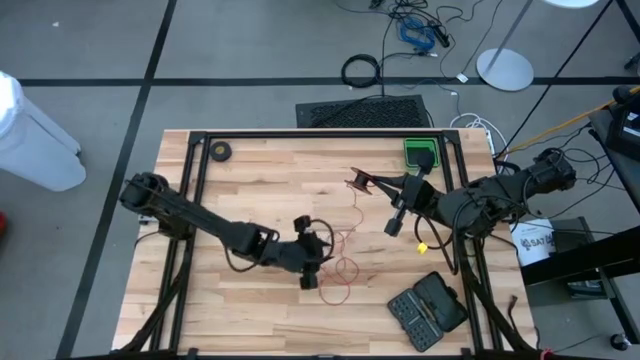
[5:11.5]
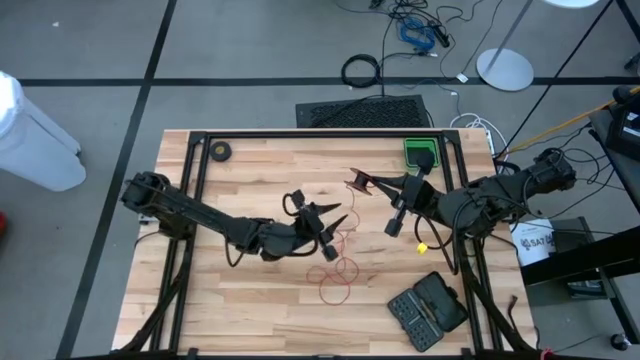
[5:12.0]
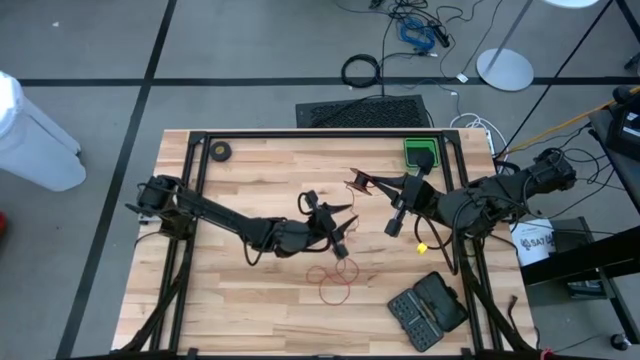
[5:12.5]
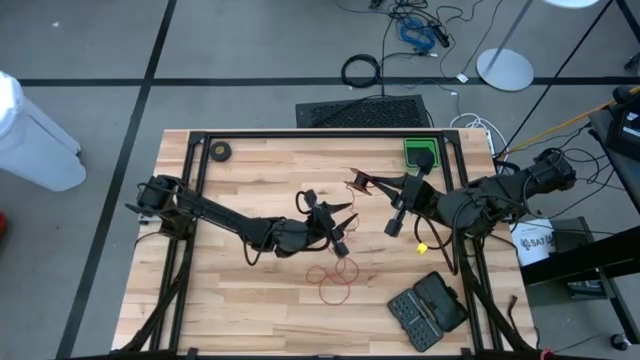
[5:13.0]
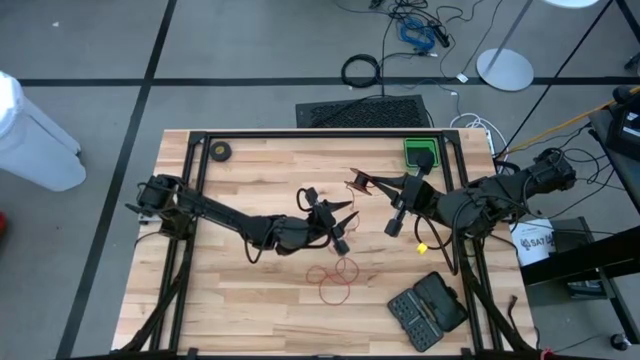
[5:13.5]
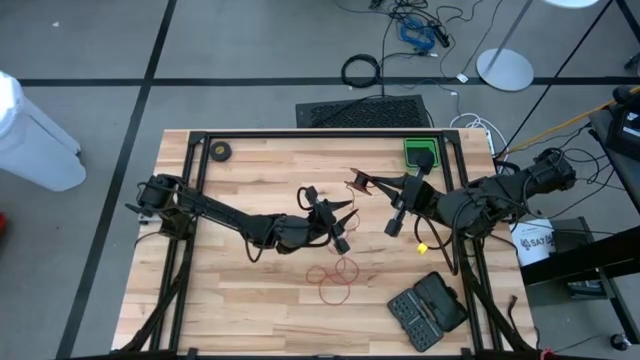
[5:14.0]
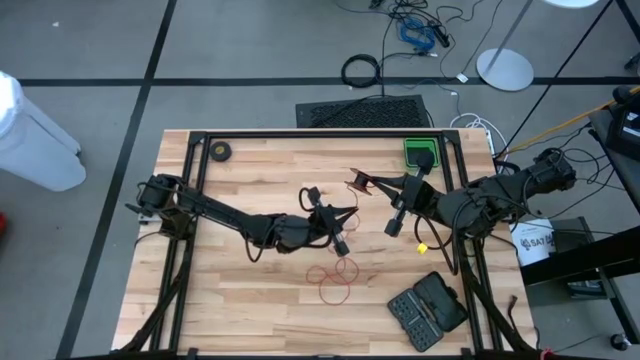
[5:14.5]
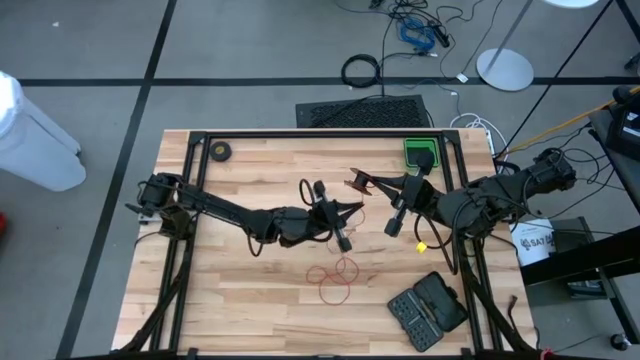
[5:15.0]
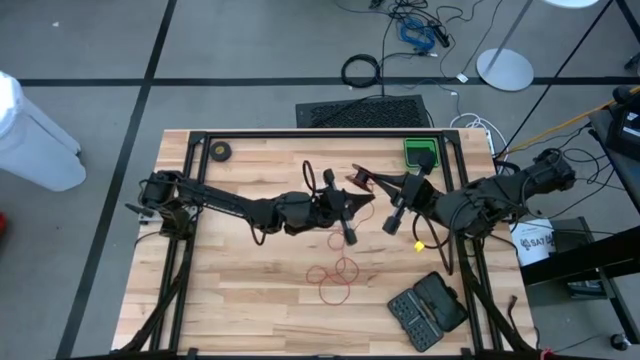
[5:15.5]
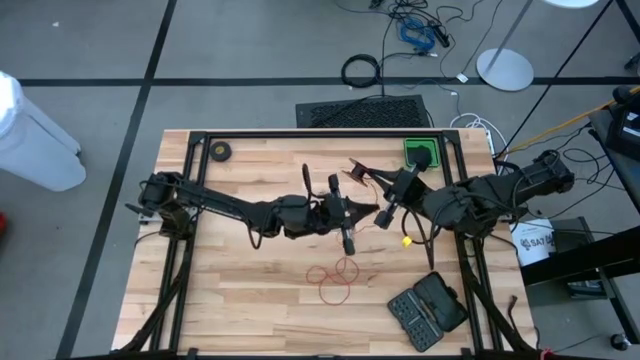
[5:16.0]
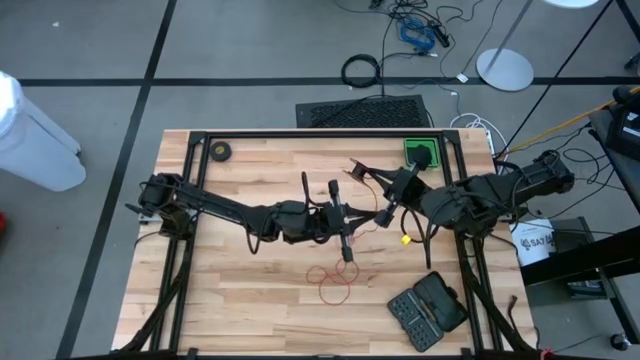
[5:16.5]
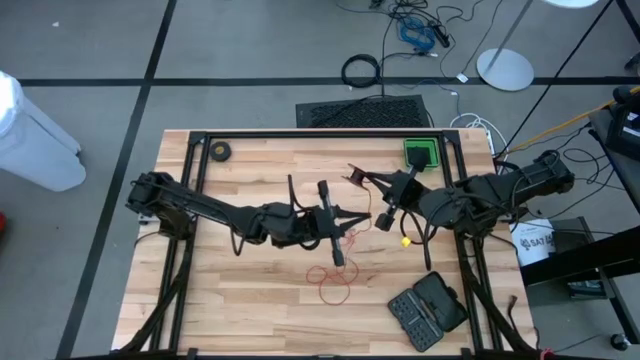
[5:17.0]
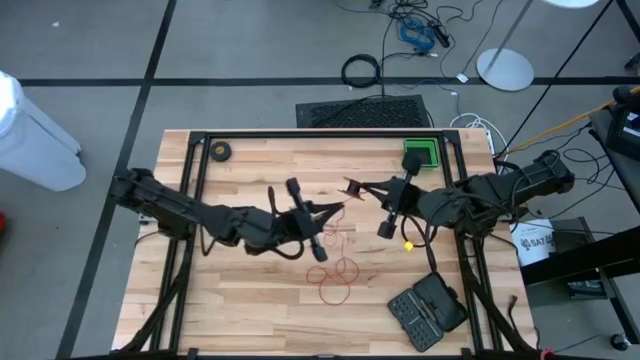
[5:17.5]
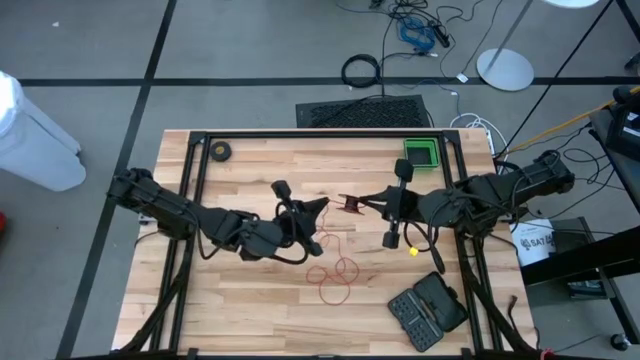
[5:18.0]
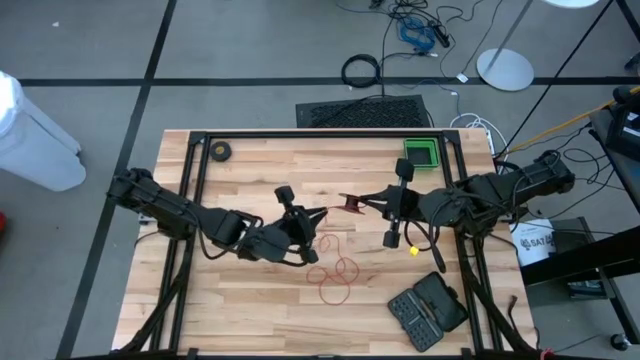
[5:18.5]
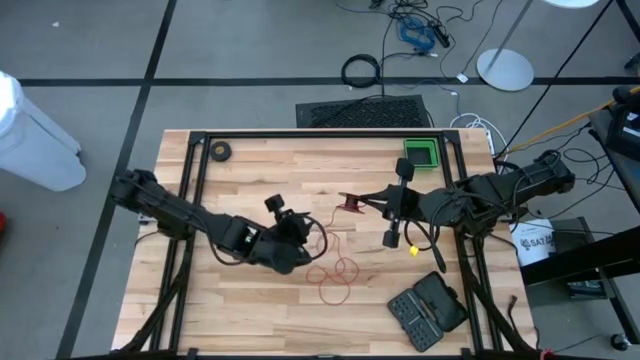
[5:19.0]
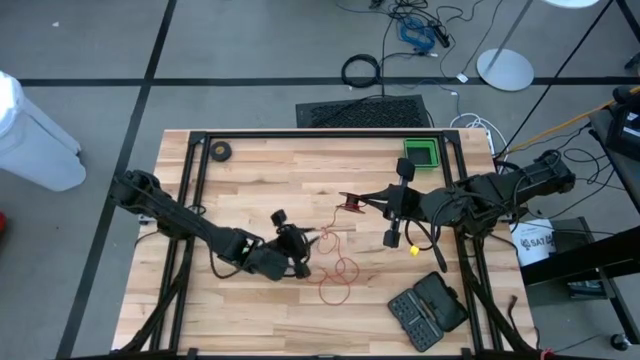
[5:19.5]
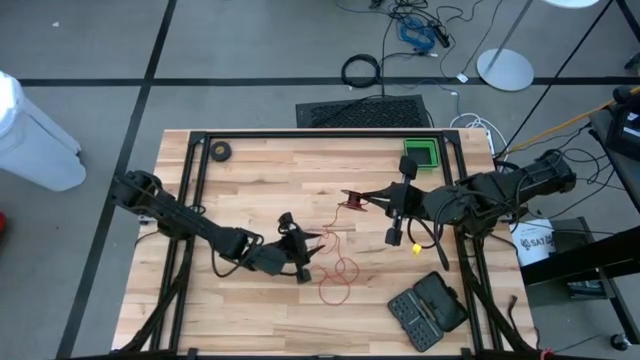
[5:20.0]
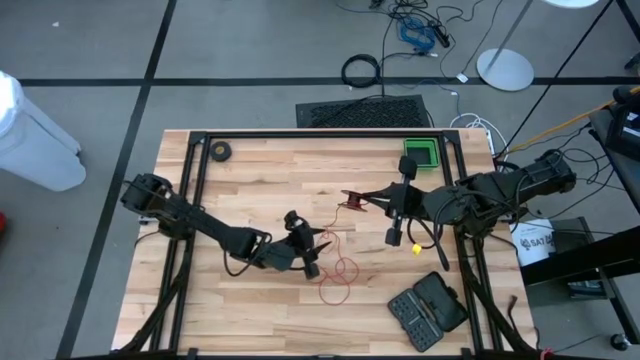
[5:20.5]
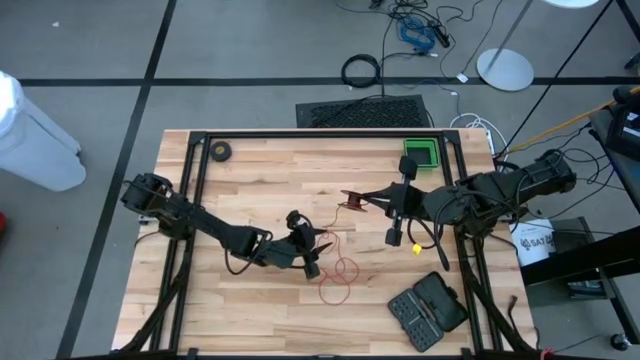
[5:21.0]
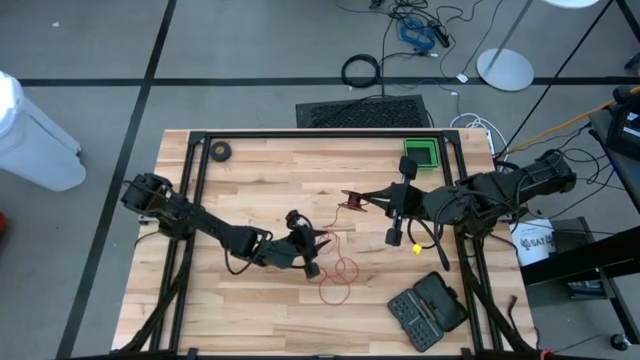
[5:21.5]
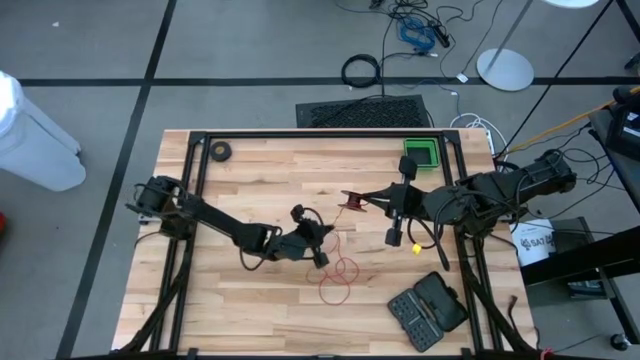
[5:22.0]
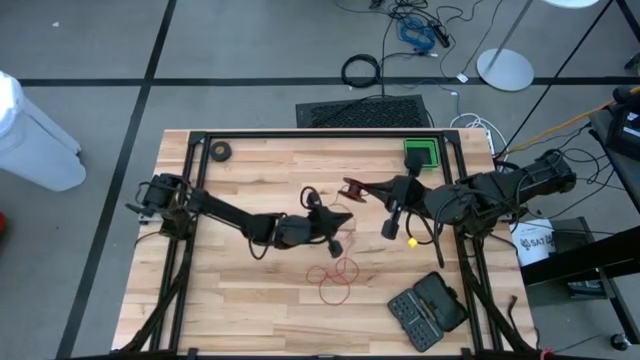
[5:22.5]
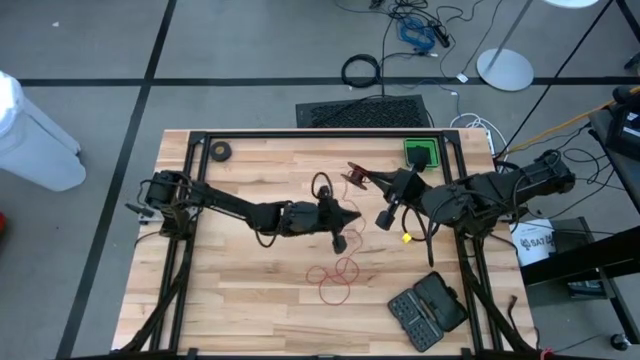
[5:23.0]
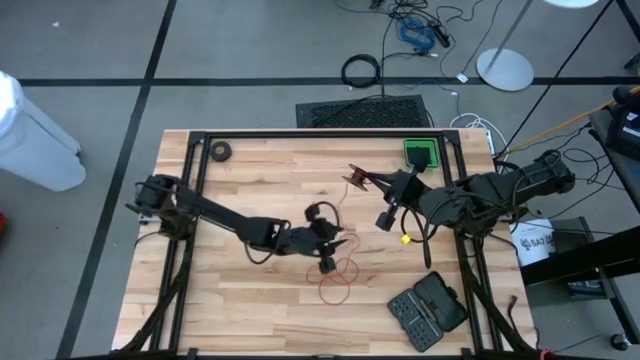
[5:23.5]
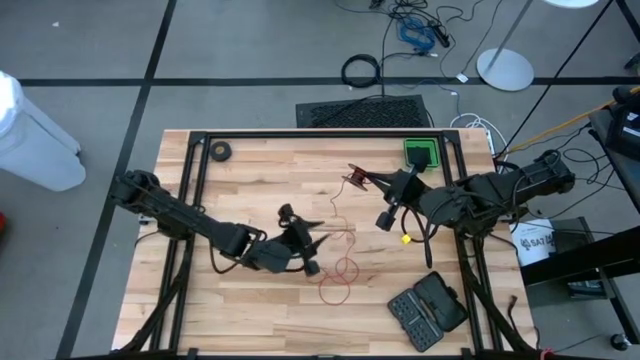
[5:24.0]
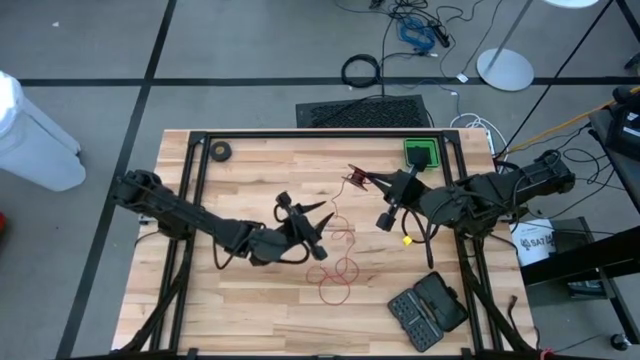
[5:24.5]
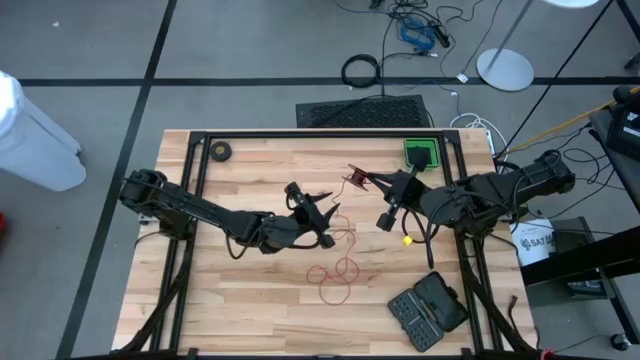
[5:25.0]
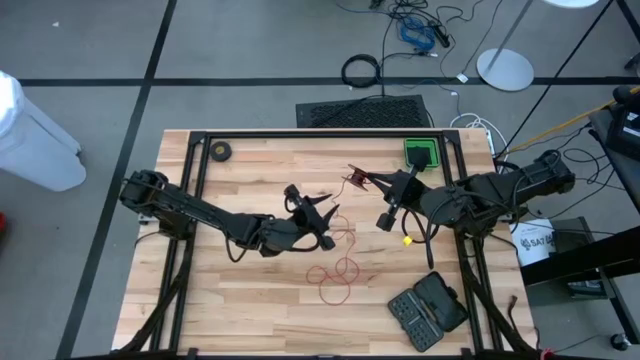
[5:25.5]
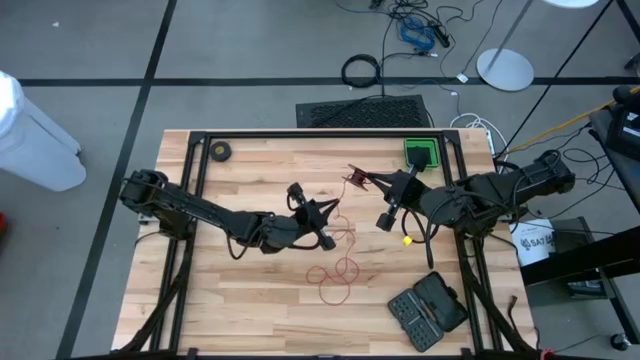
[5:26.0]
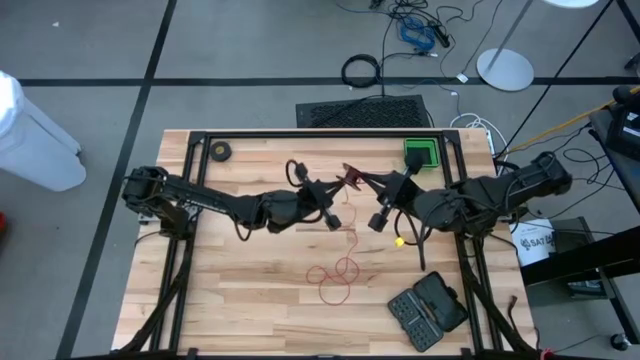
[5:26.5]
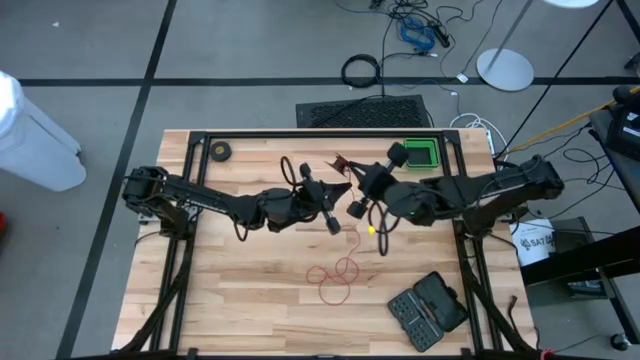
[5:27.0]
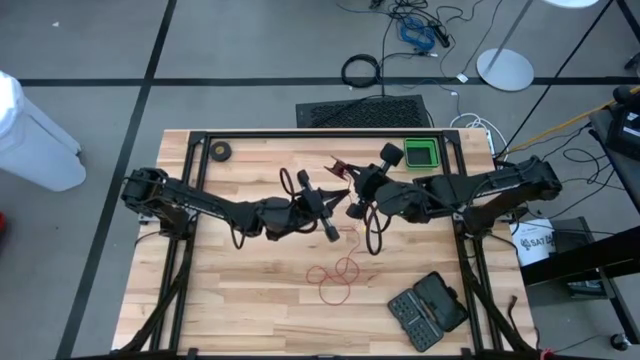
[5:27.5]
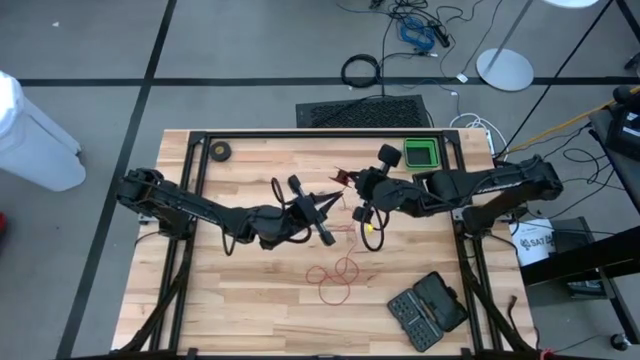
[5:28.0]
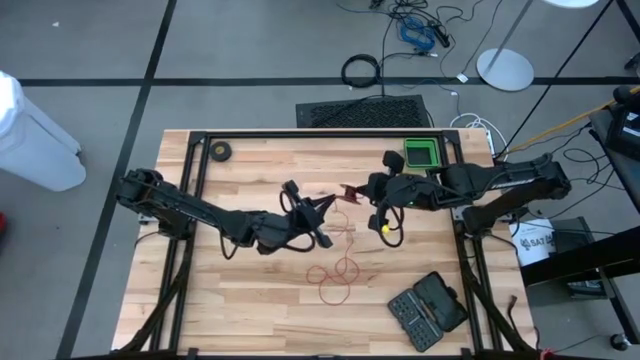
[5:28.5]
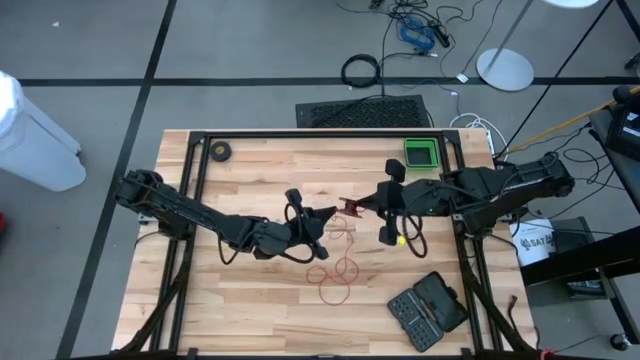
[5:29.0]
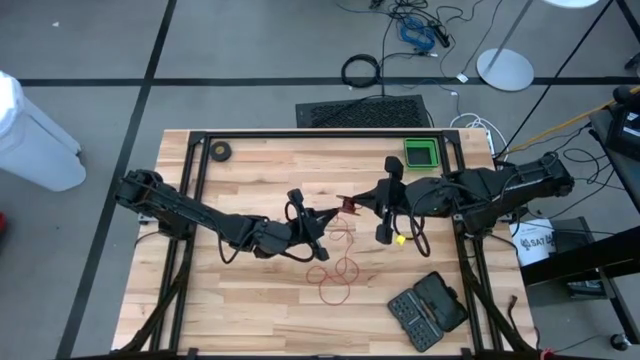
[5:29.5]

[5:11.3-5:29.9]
Task: Coil cords
Coil the red wire into the spool

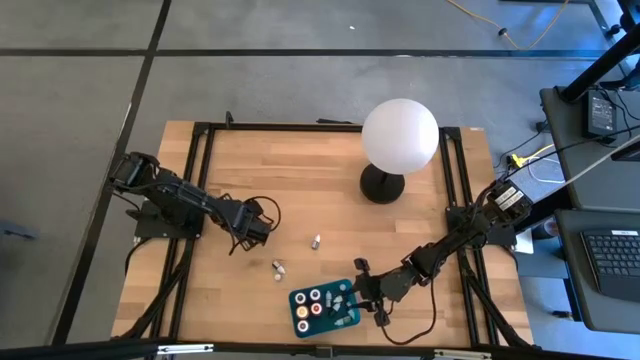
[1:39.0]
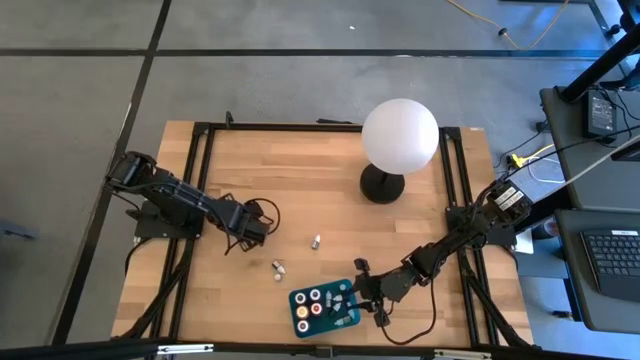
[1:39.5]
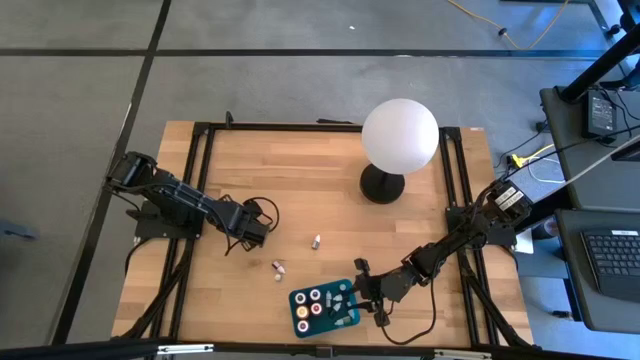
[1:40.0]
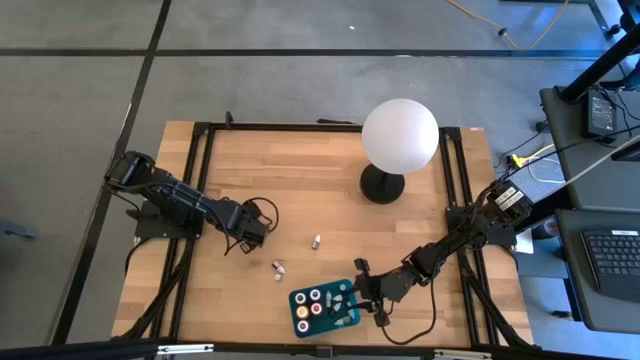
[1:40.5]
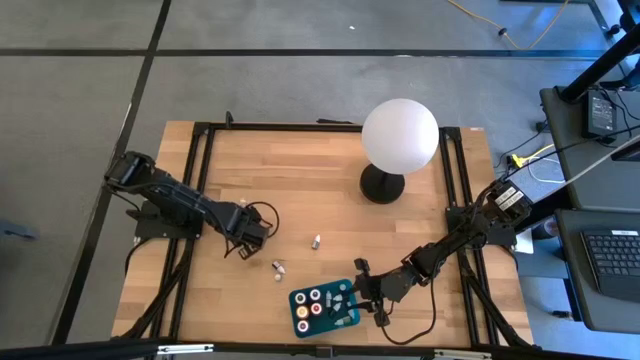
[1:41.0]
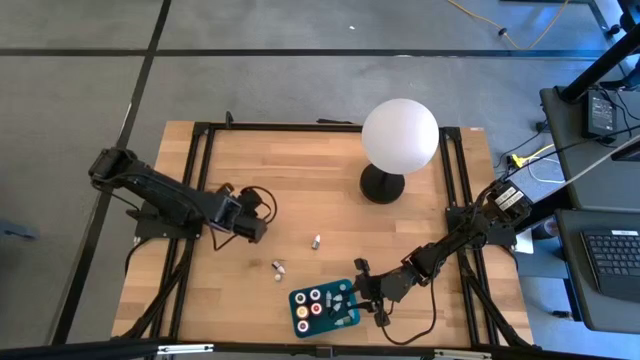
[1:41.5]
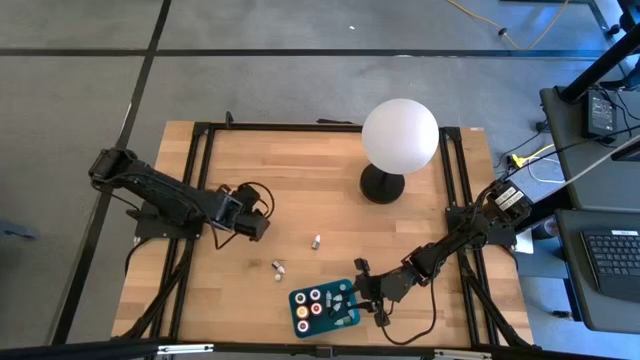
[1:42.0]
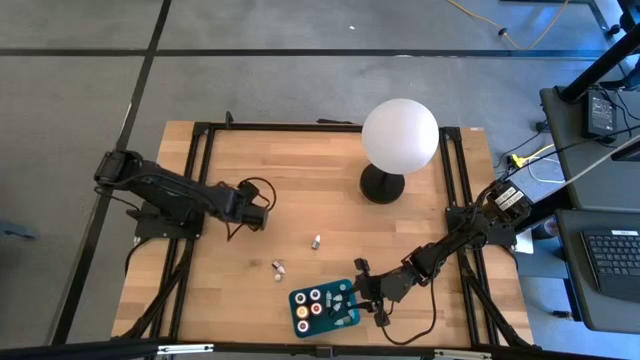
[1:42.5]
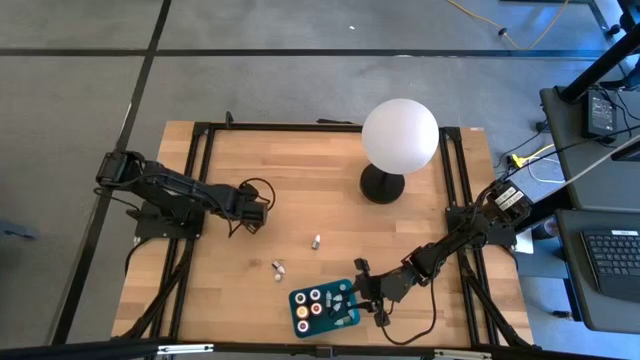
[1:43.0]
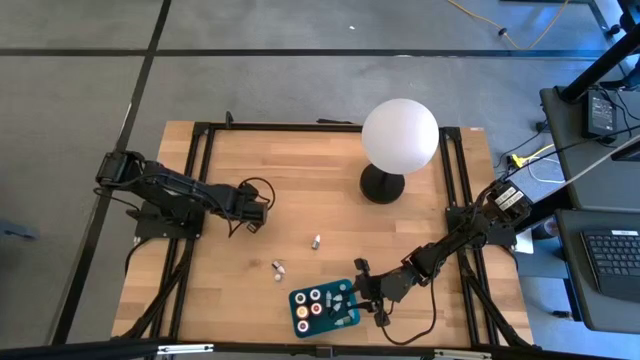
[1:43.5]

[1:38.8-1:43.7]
Task: Pick & Place food coloring
Put the small brown food coloring bottle into the blue bin
